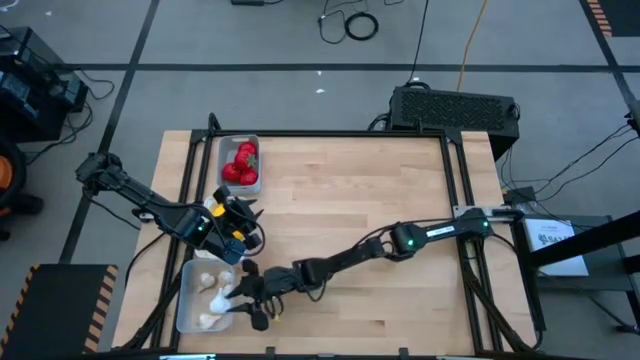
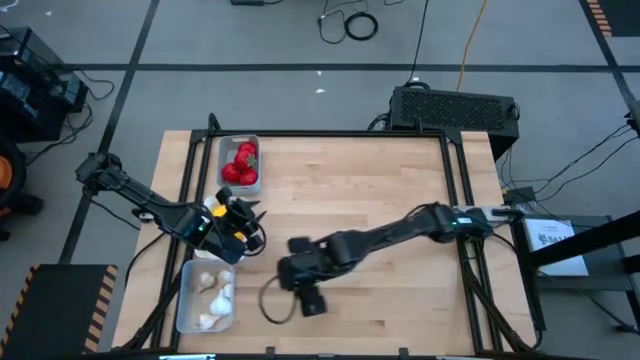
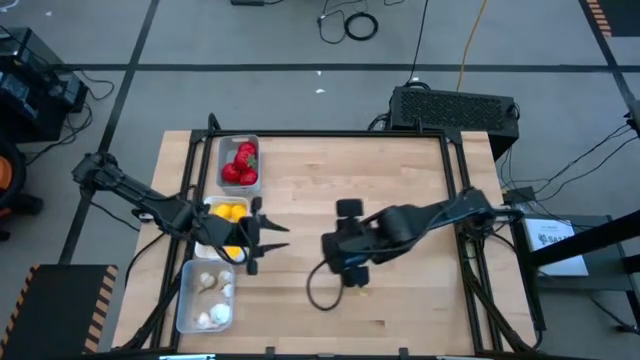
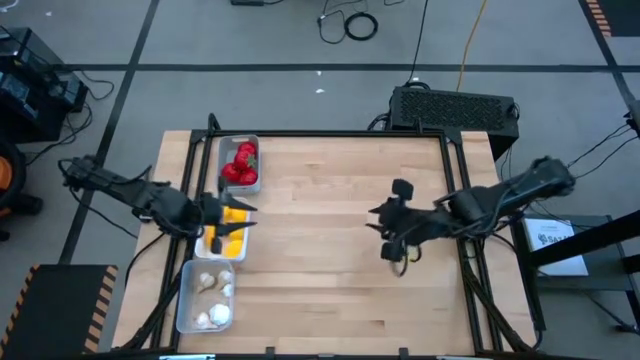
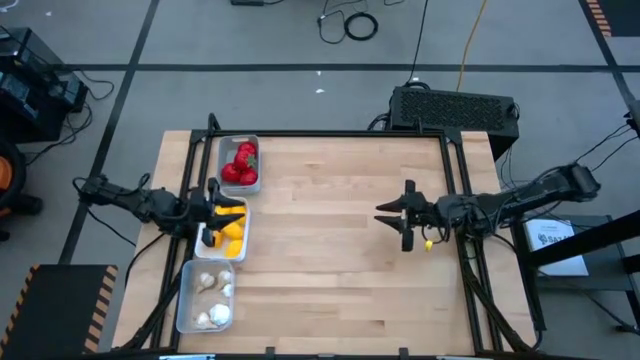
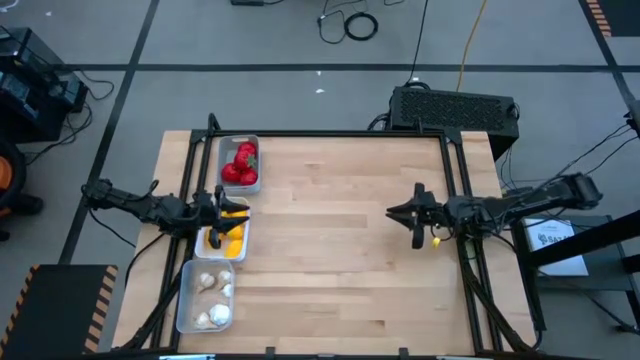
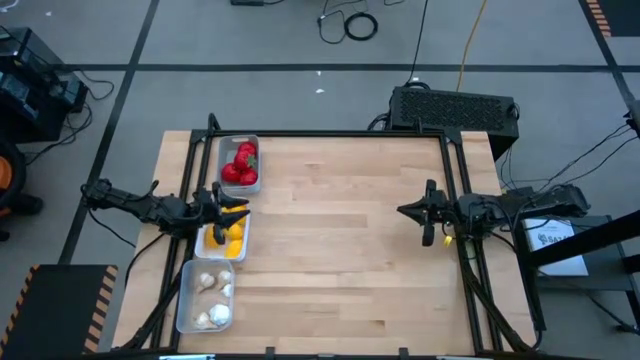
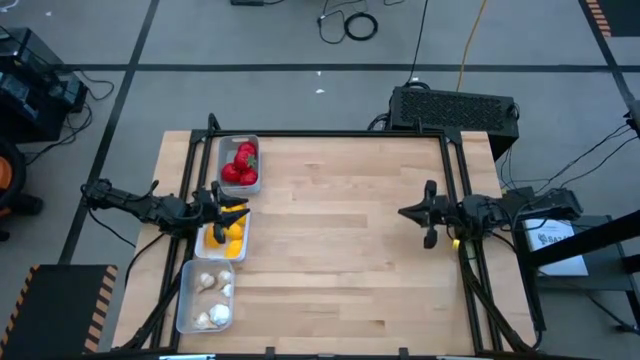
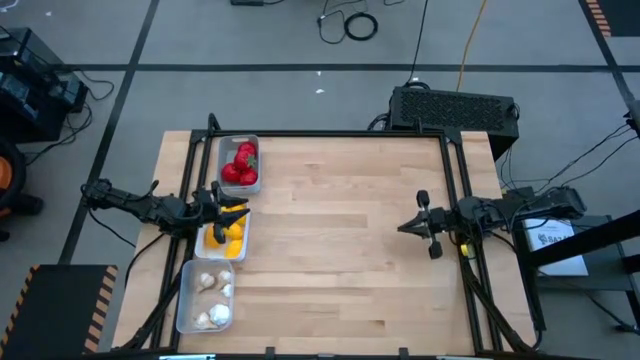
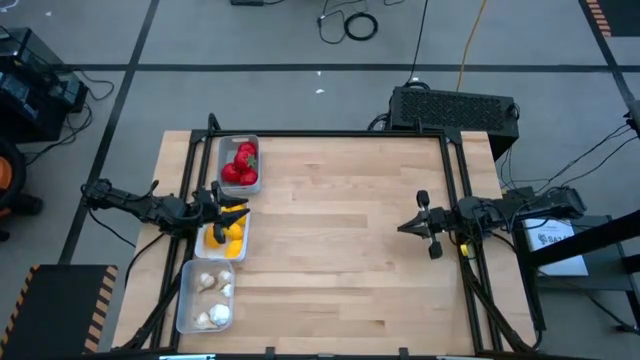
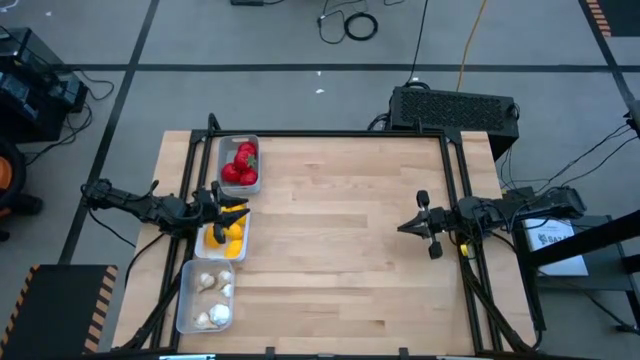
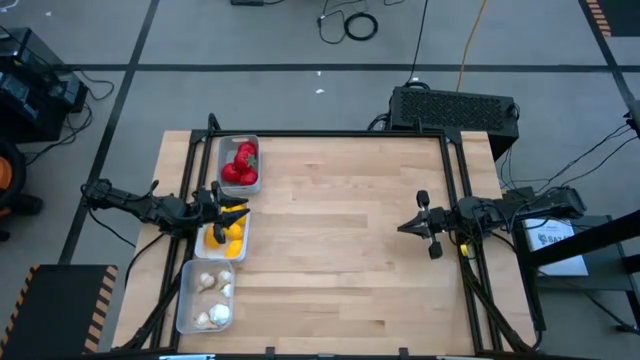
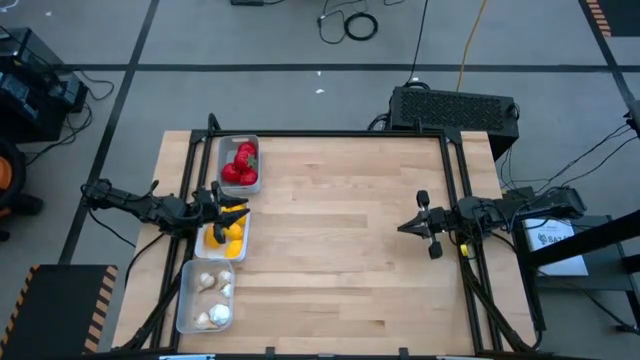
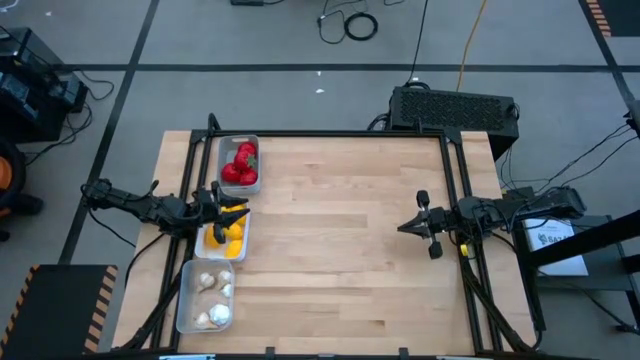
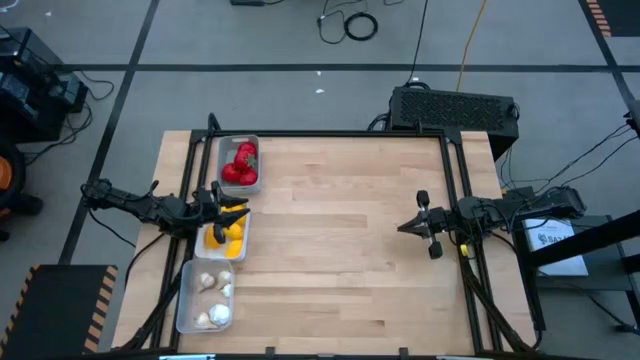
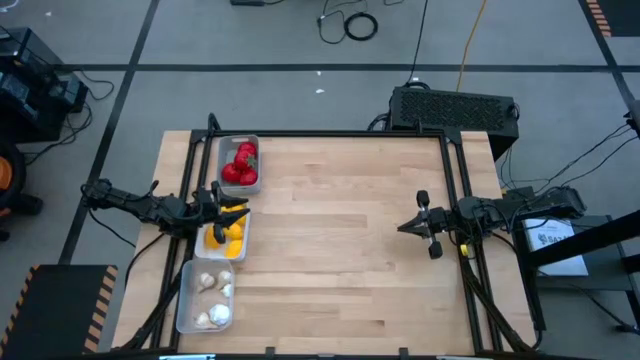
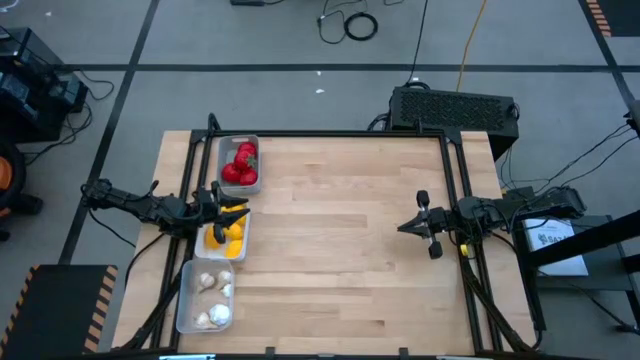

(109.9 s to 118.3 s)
Task: Sort produce into baskets
Return to Home Position

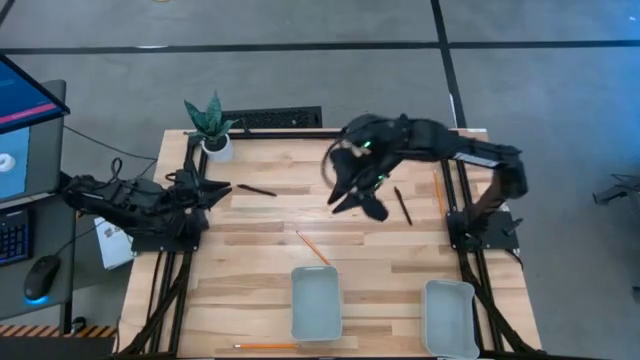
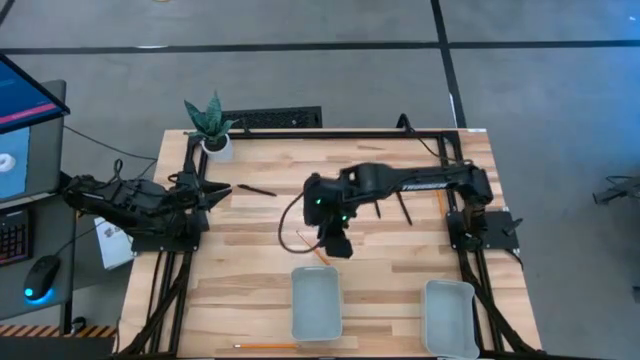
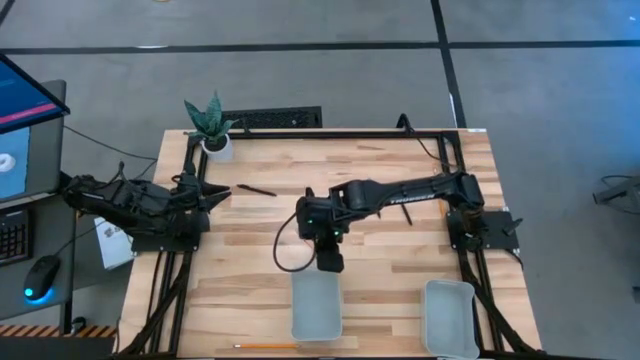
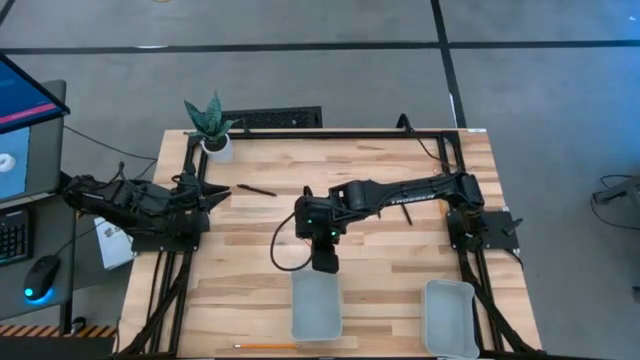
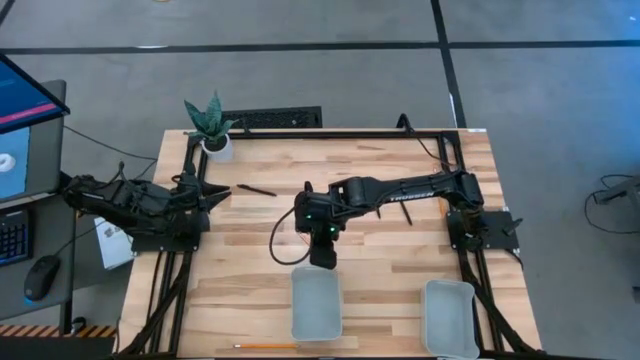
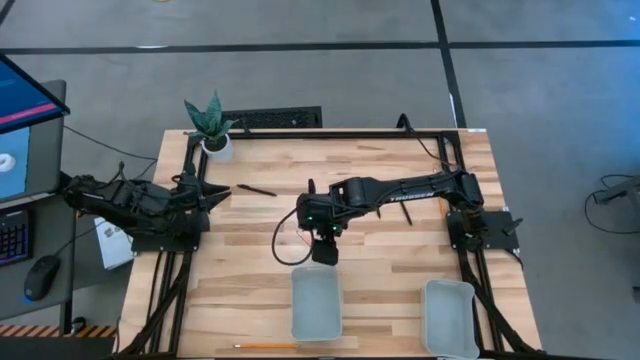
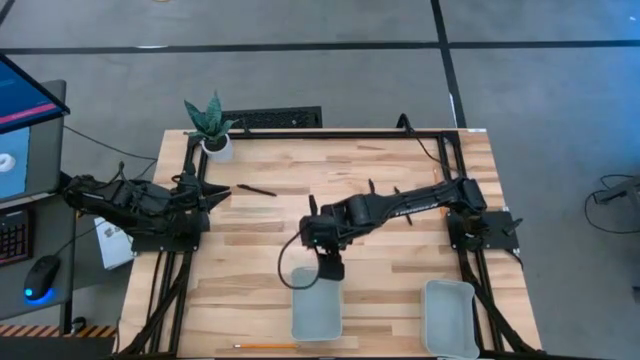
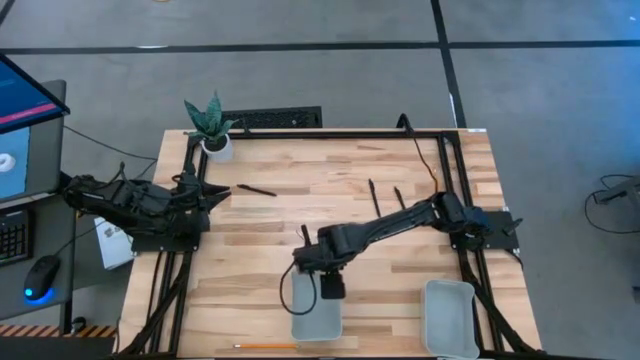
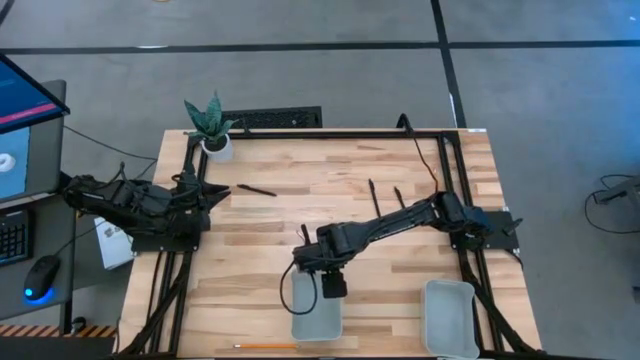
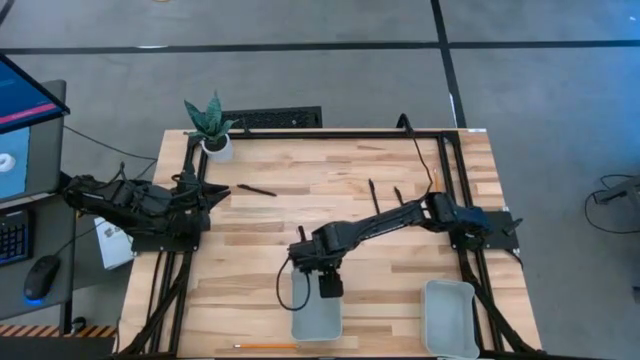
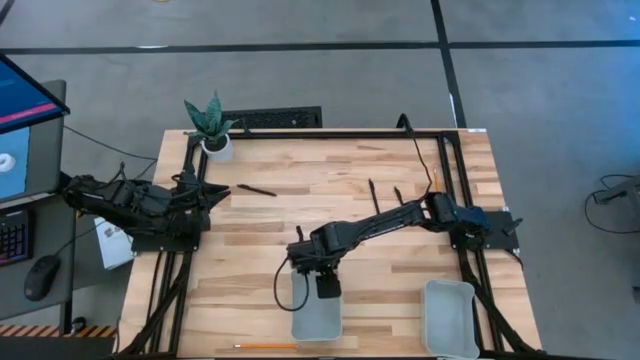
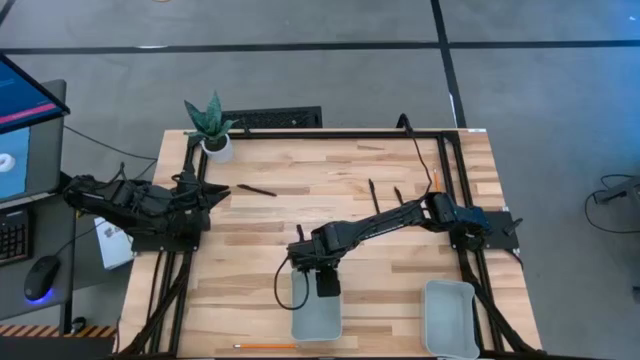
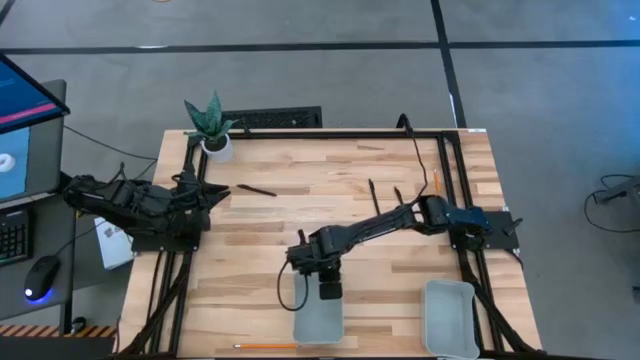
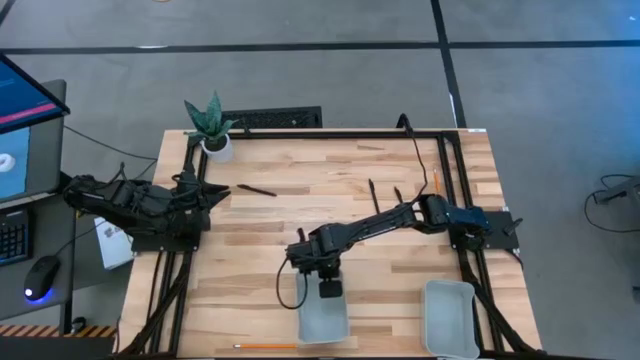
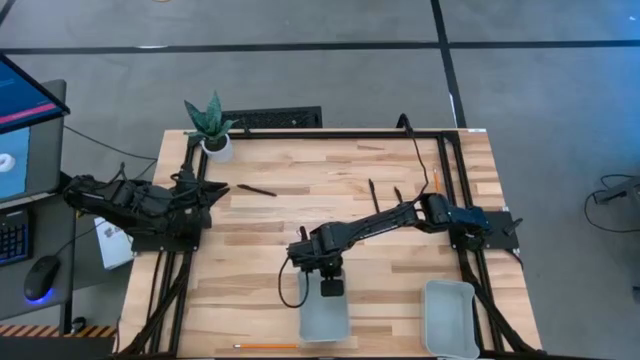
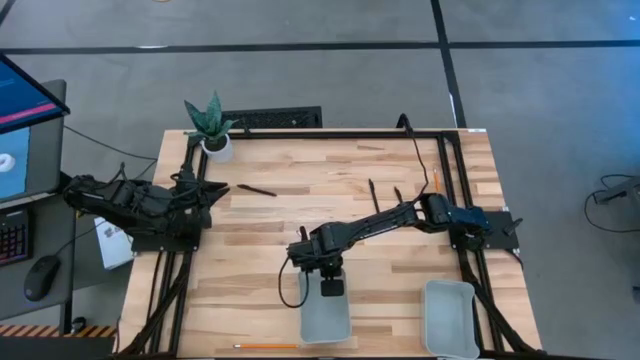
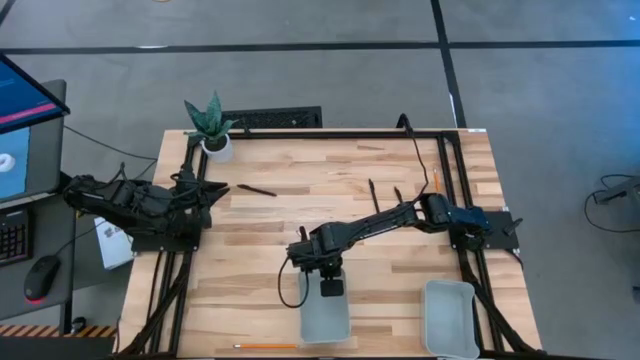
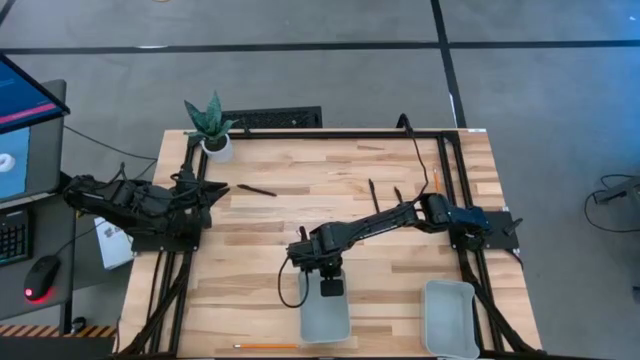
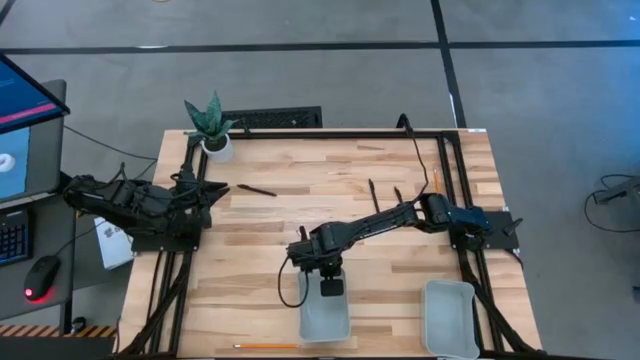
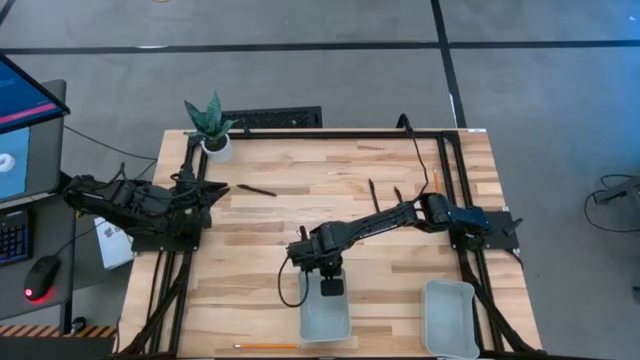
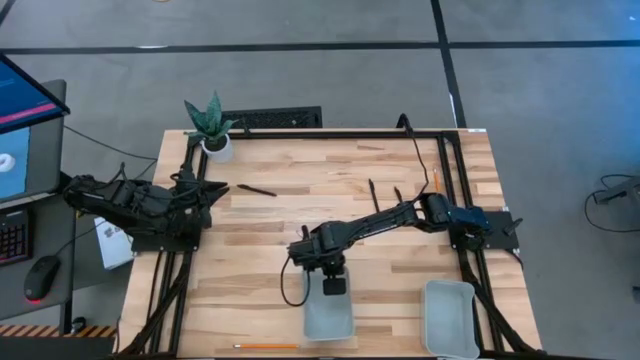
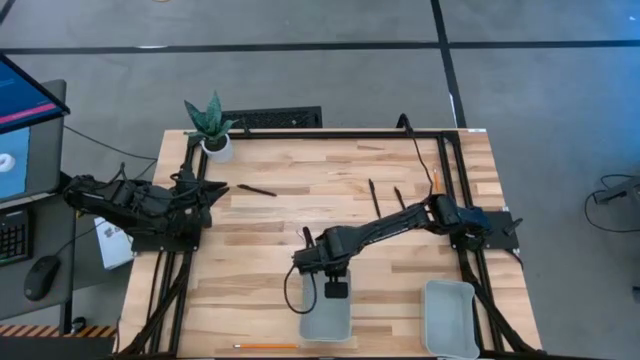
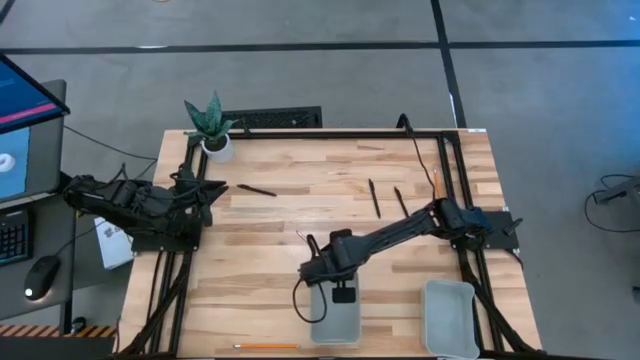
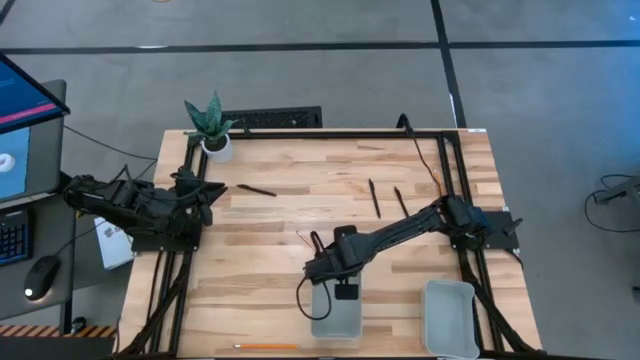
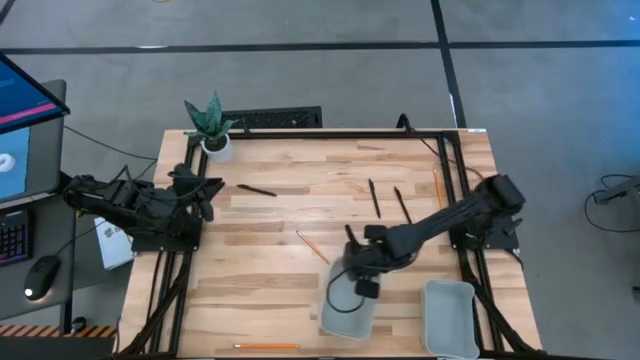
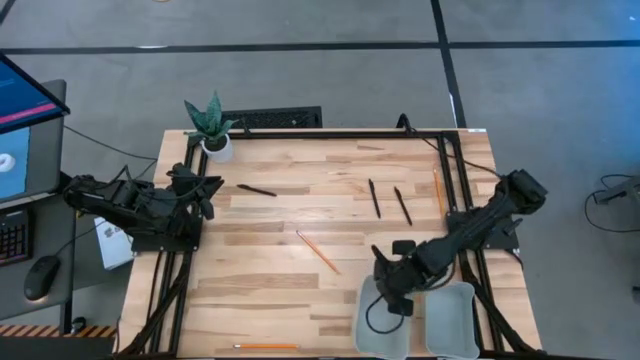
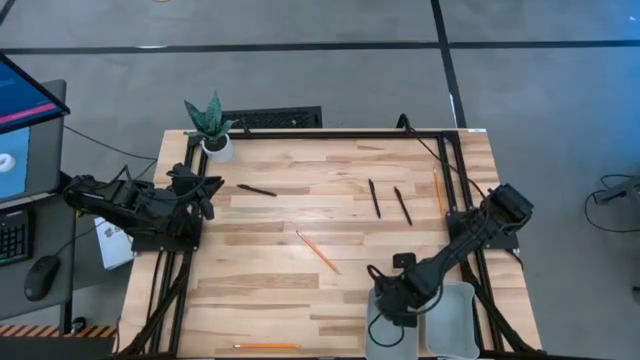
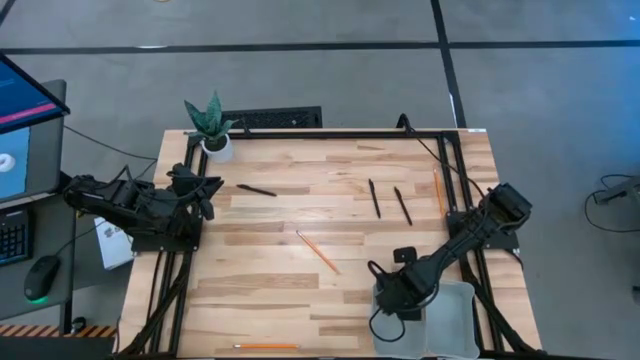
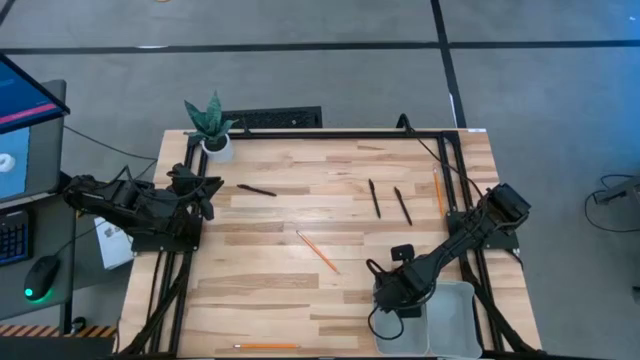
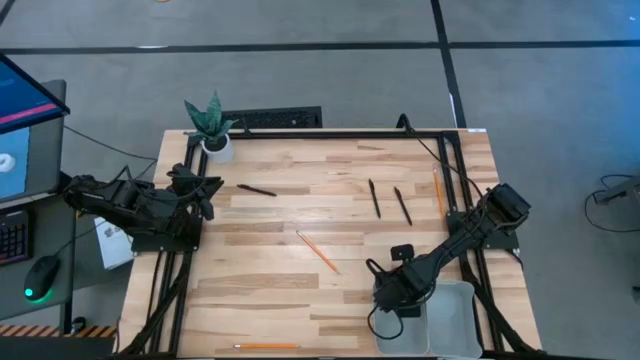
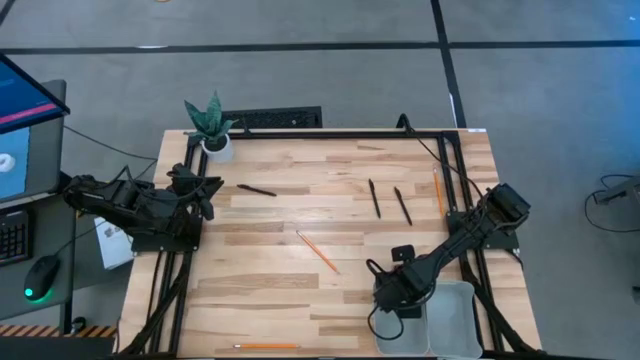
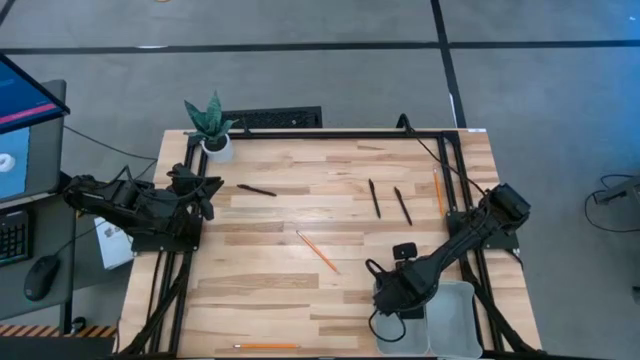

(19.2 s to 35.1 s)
Task: Sort pens & pencils
Move the left gray bin to the bottom right of the table
